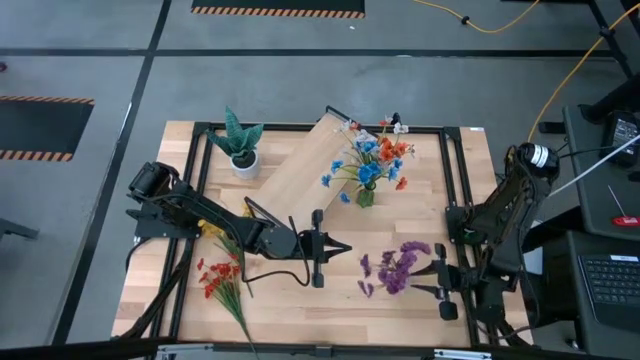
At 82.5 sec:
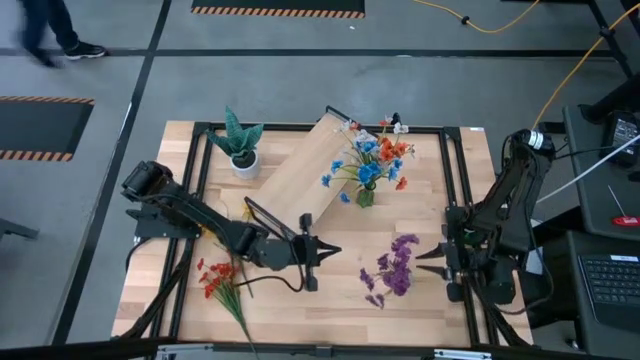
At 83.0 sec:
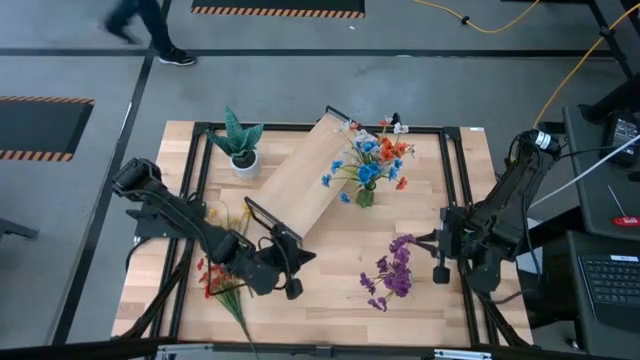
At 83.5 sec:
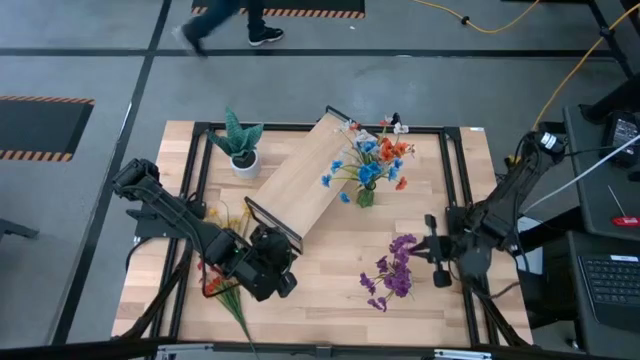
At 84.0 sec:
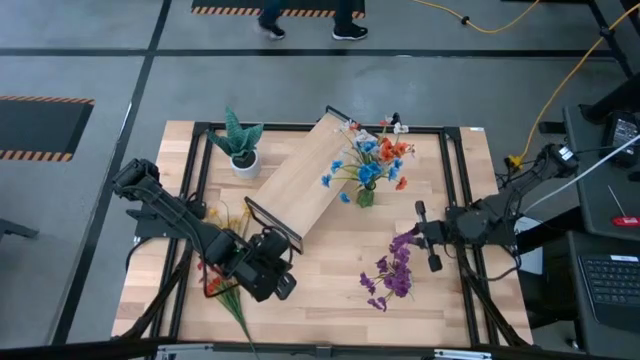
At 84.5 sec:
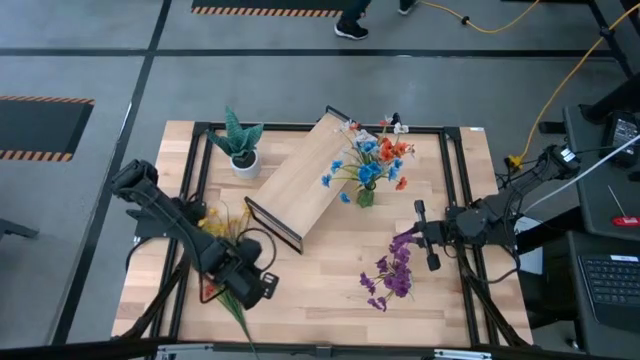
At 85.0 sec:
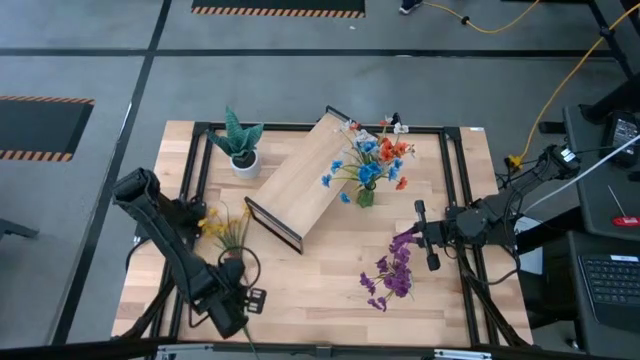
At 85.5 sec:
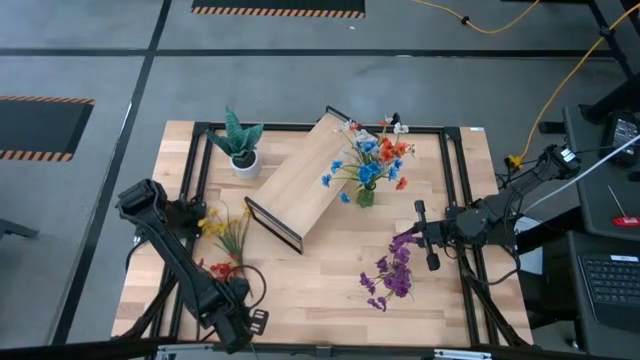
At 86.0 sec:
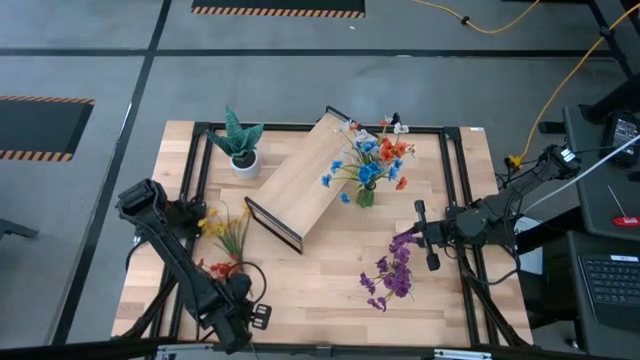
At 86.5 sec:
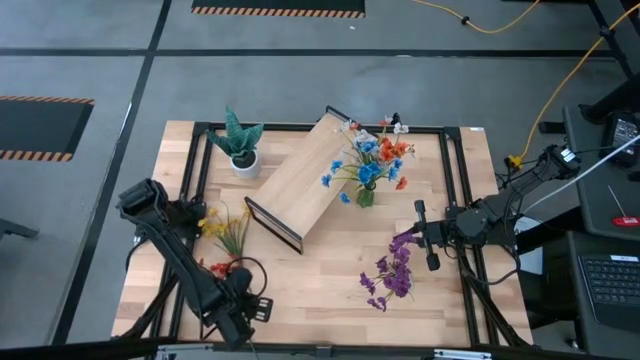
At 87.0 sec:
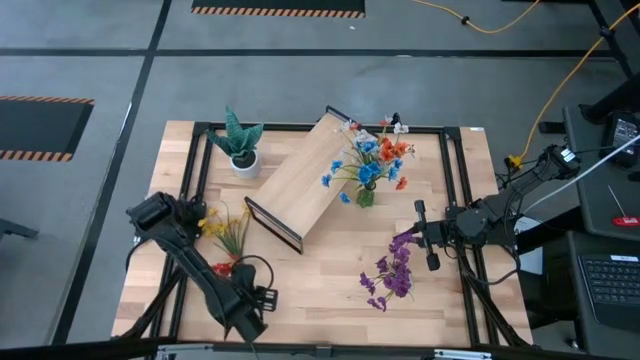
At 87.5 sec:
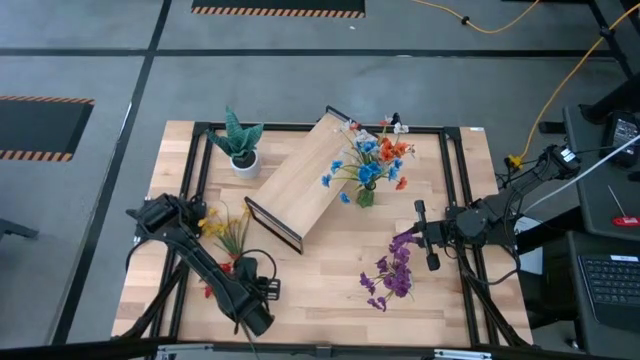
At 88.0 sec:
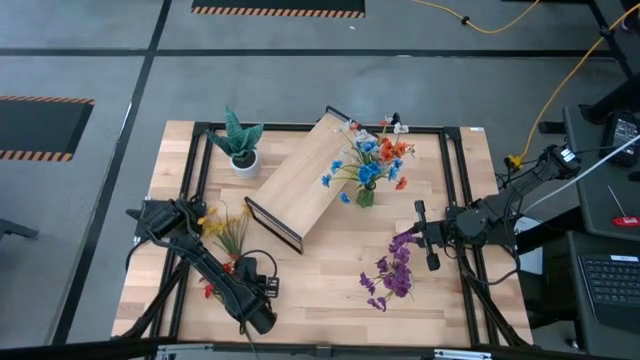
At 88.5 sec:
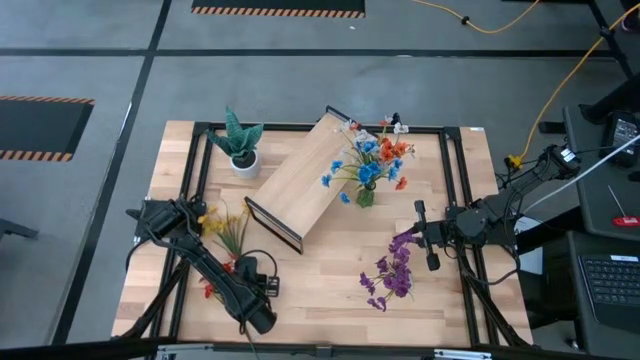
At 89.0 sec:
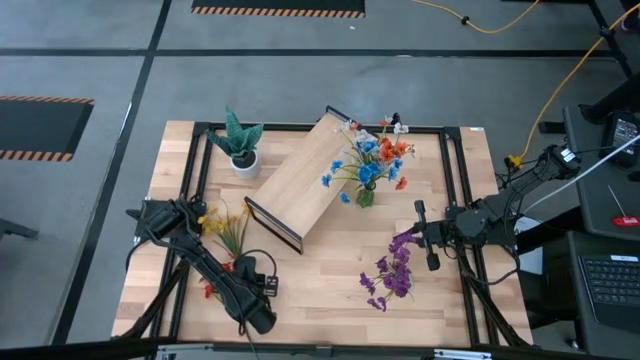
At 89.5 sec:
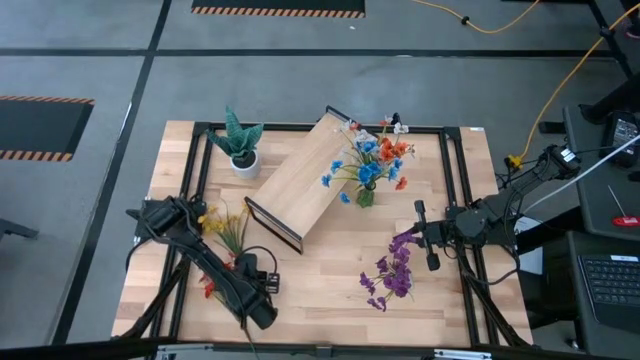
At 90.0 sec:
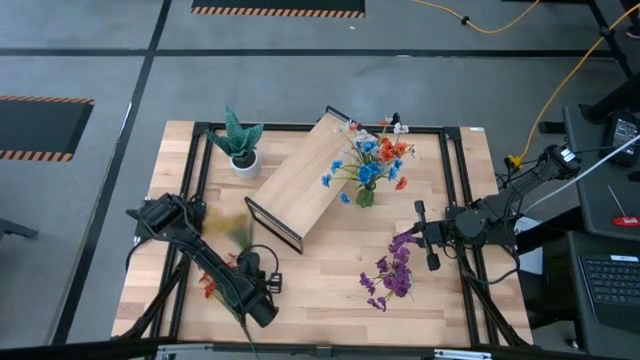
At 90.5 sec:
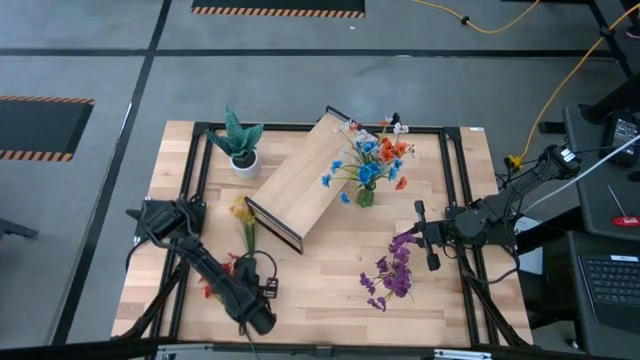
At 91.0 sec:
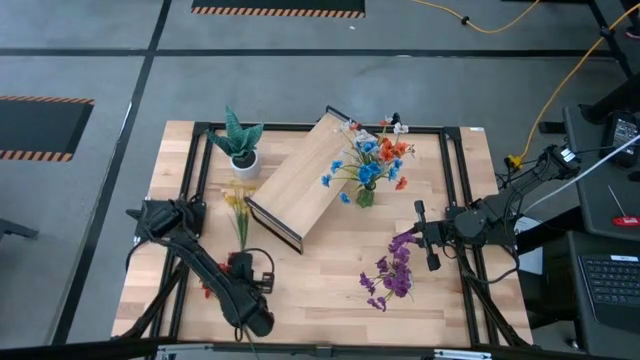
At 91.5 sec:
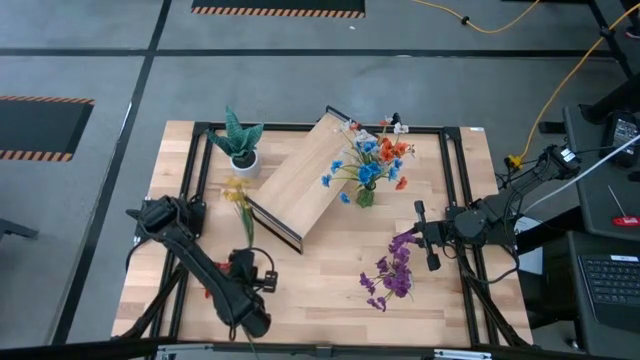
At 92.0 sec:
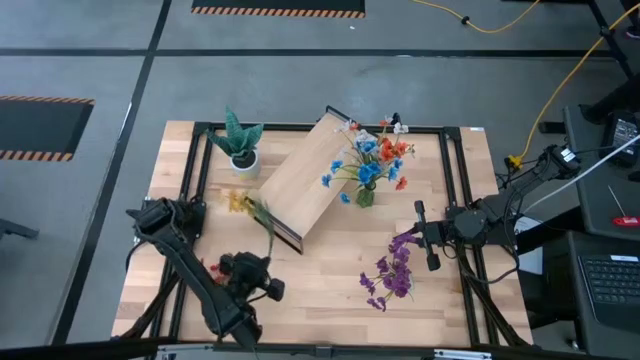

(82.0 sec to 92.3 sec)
Task: Pick and place flowers into a vace then onto a shelf
Put the yellow flowers into the transparent vase

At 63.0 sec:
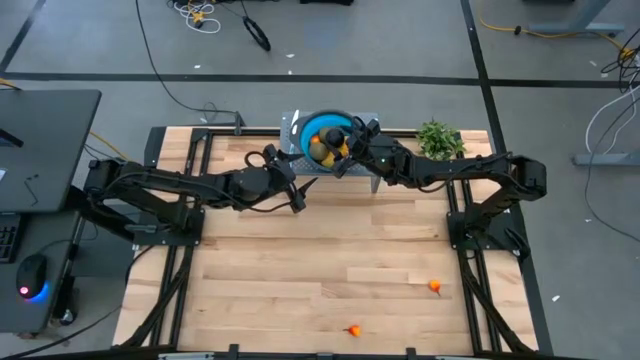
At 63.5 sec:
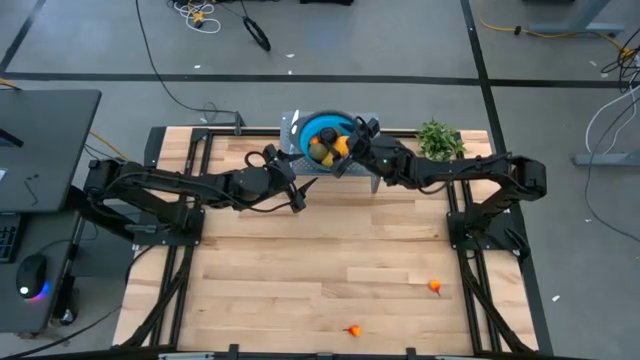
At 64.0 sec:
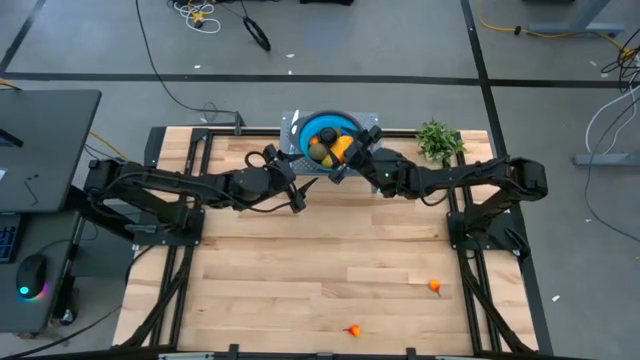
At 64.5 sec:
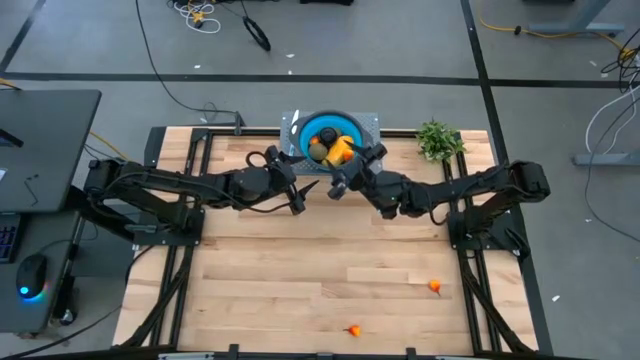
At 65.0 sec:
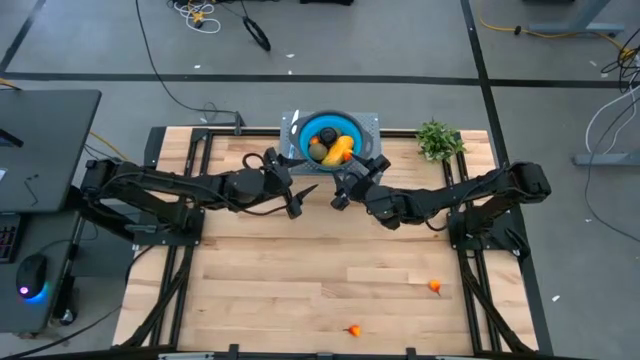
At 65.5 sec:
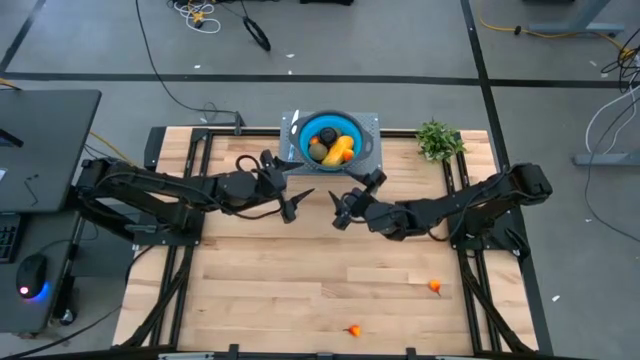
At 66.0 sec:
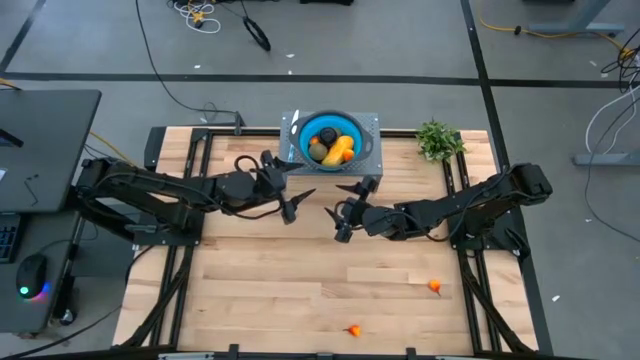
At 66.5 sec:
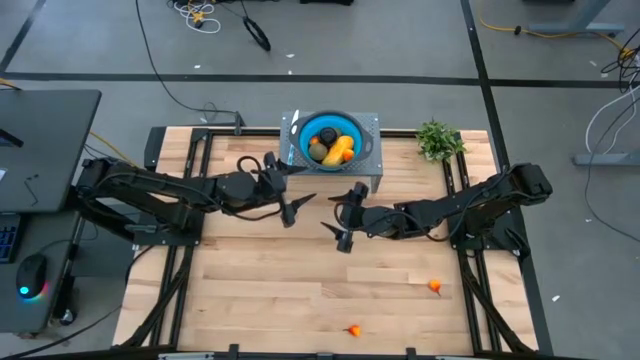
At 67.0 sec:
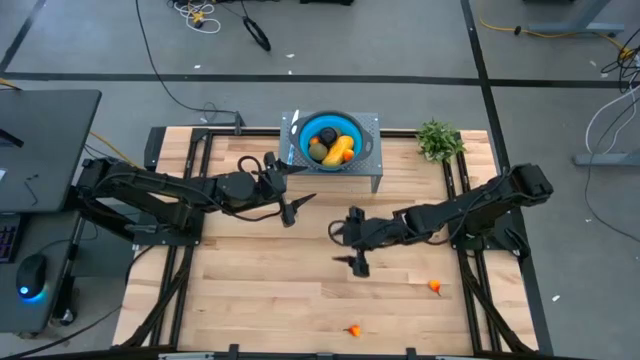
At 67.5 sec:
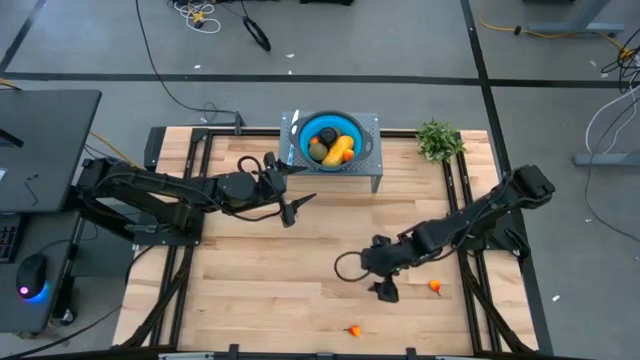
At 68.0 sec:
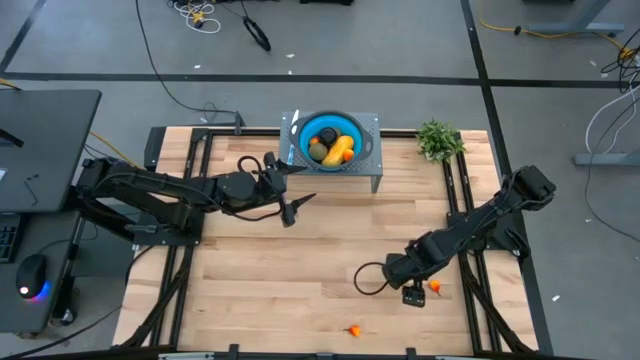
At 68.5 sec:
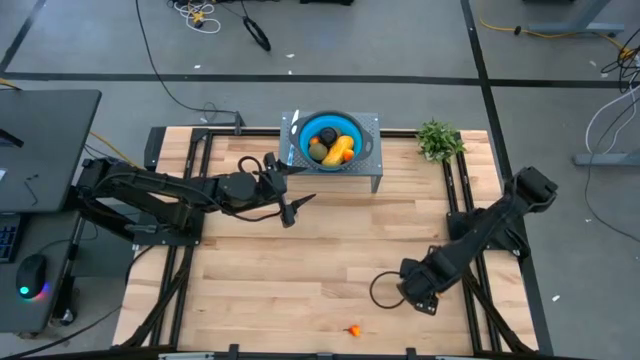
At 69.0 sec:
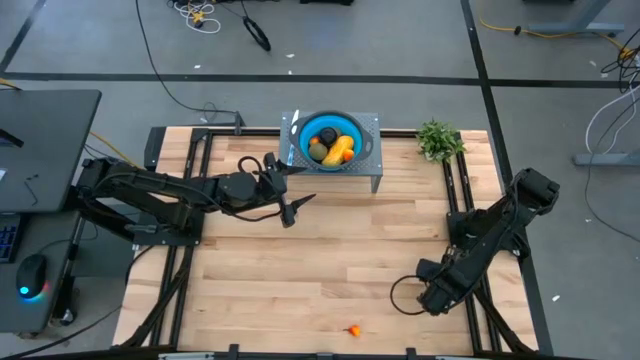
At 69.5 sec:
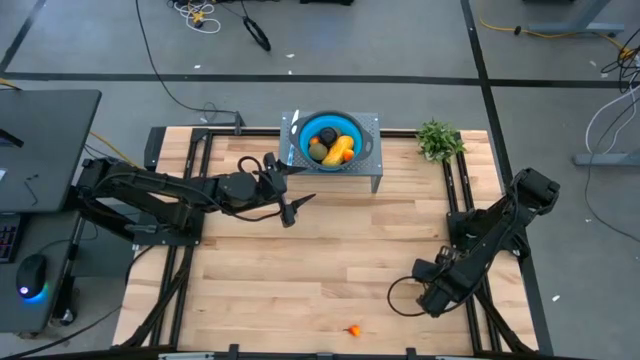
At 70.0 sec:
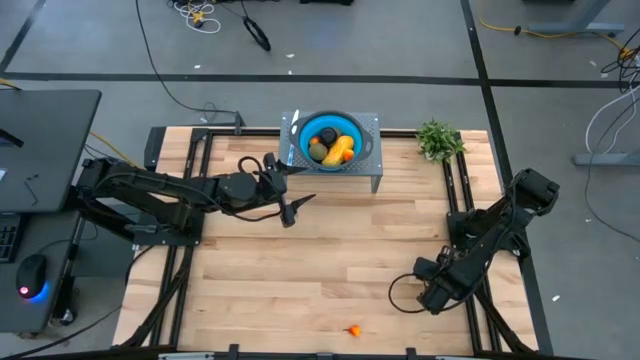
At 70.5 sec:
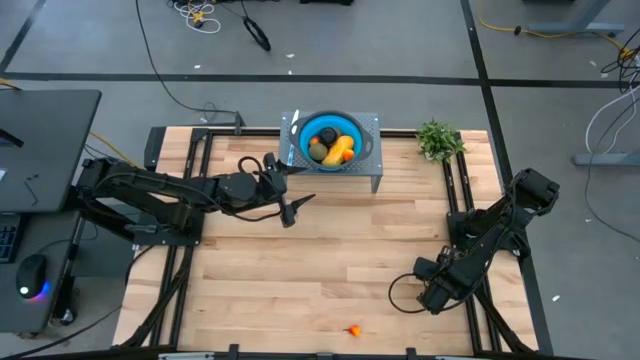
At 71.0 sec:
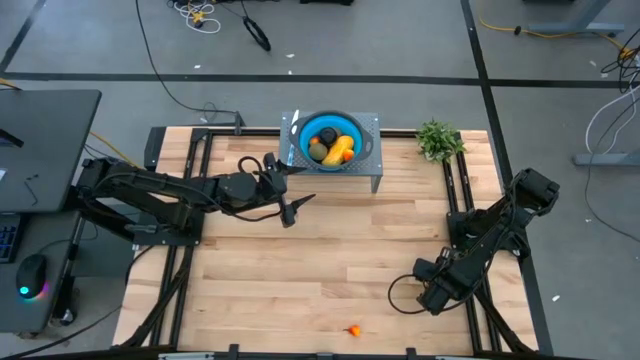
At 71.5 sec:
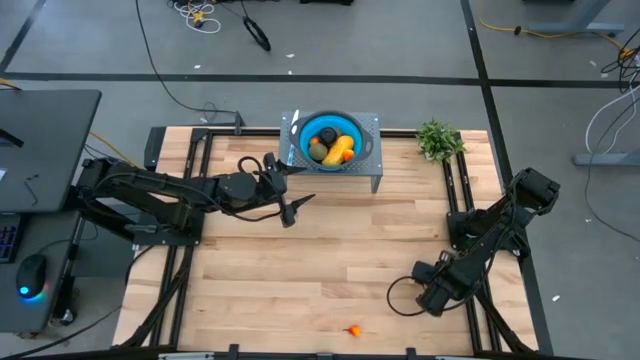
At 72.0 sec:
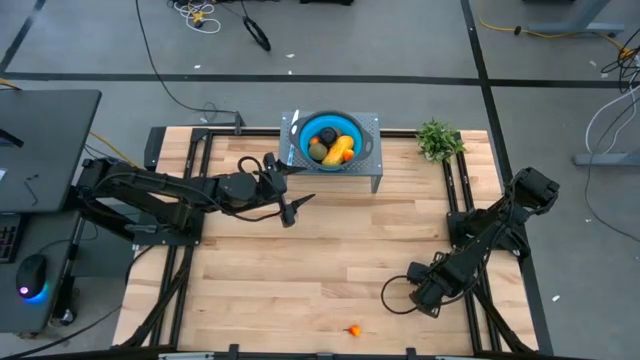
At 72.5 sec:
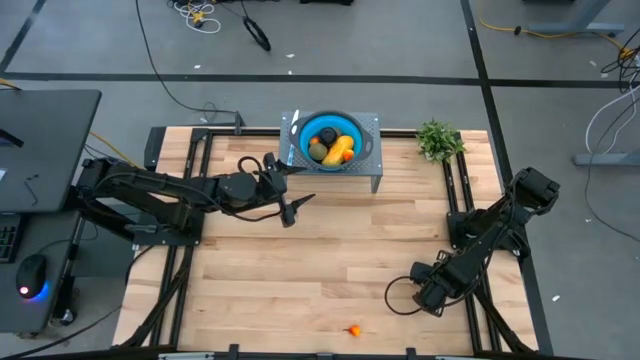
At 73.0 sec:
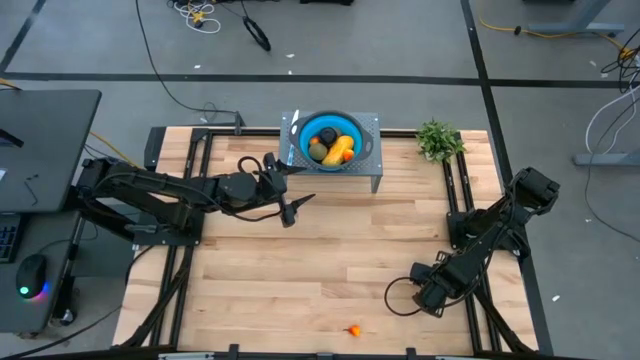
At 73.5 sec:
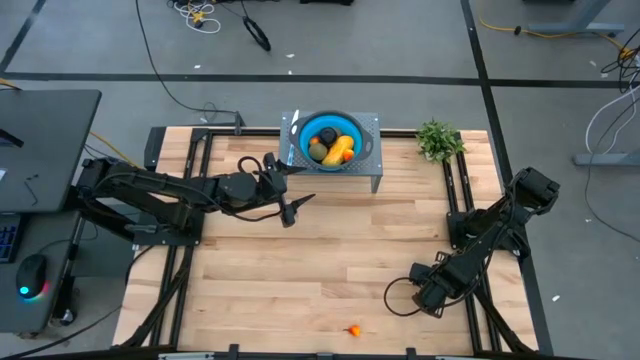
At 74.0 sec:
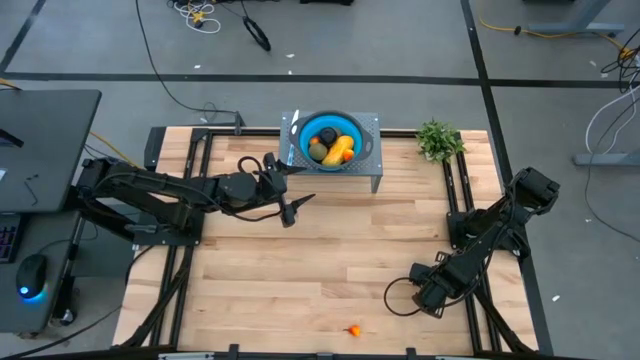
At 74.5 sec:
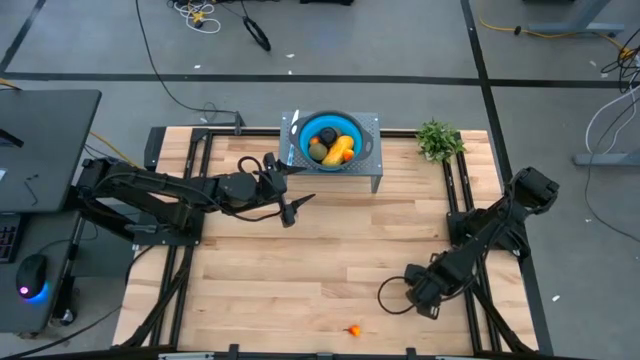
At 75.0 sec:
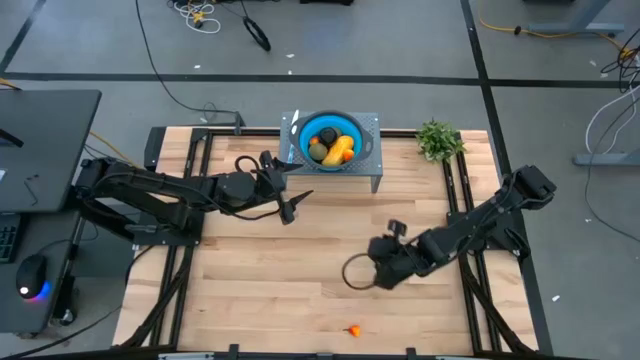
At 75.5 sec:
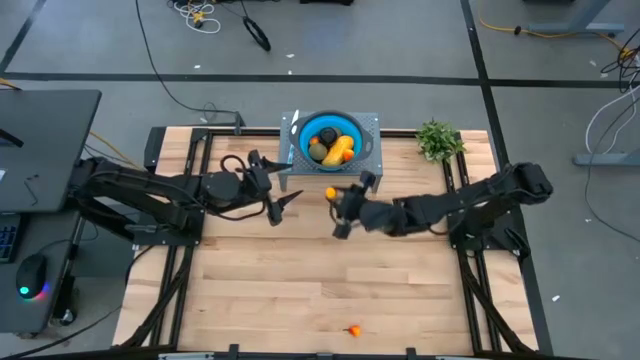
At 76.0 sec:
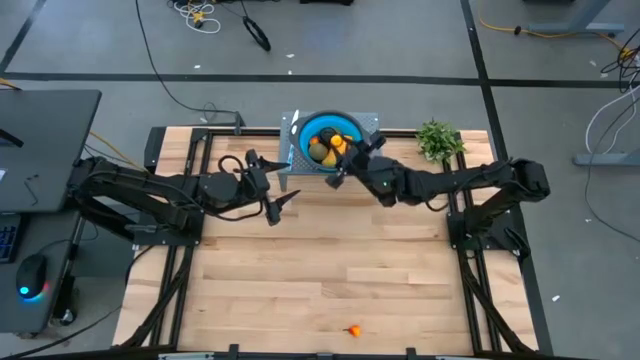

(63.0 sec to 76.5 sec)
Task: Pick & Place Fruit
Put the orange pear into the blue strainer bowl
